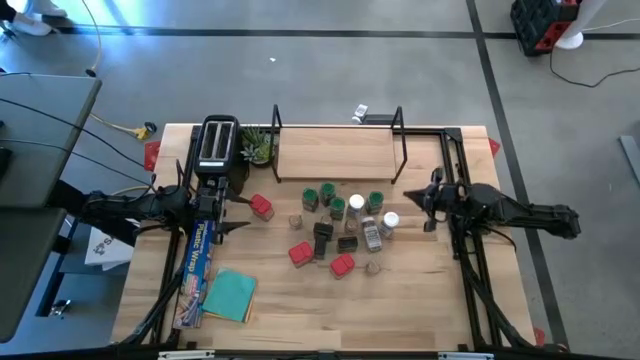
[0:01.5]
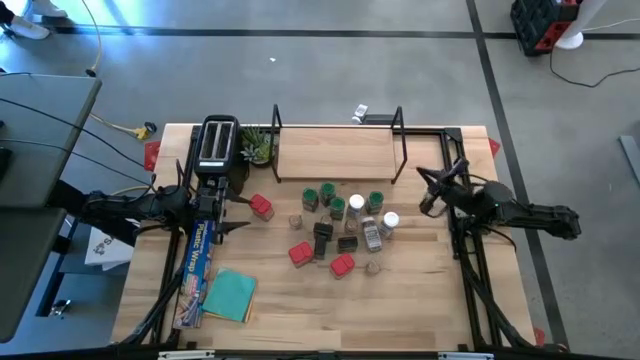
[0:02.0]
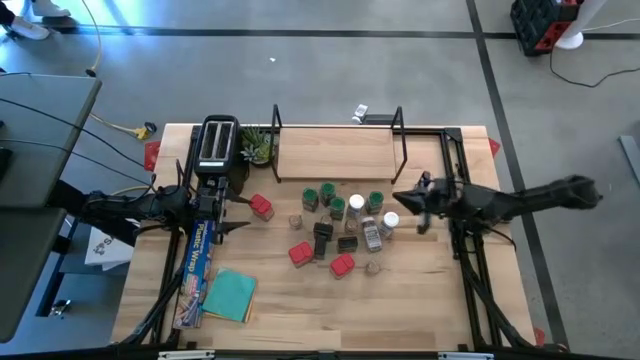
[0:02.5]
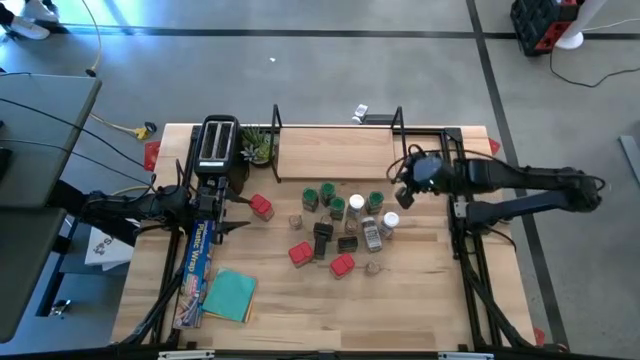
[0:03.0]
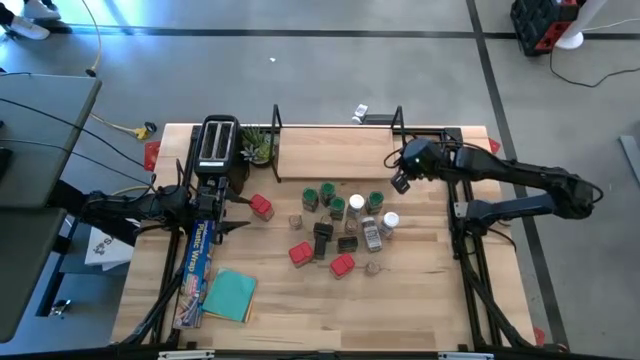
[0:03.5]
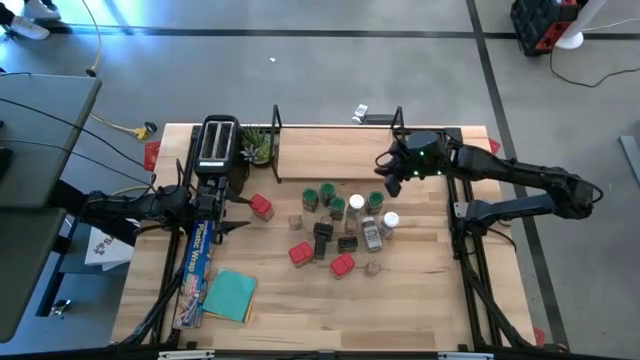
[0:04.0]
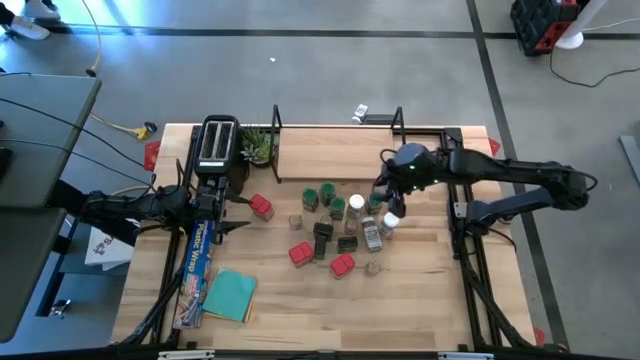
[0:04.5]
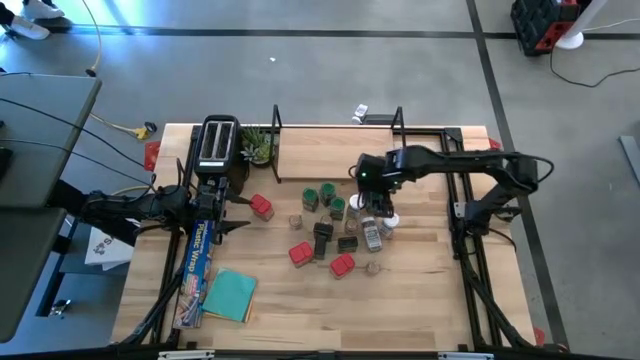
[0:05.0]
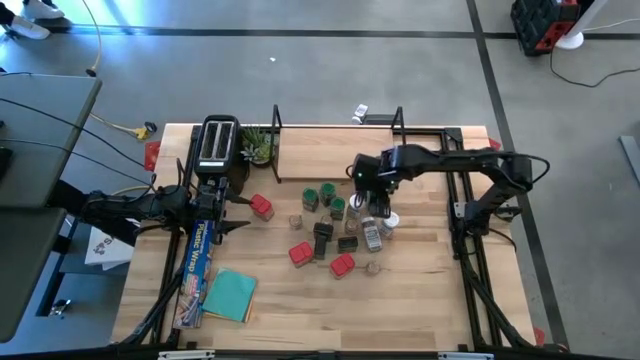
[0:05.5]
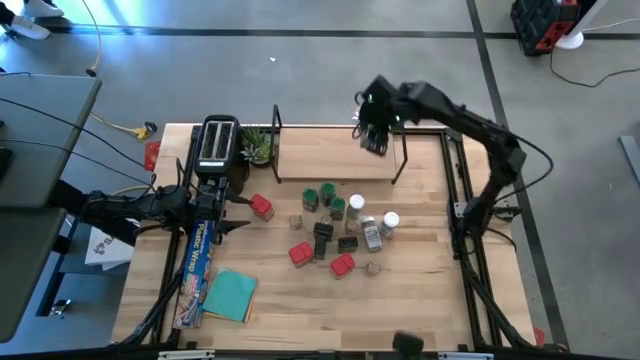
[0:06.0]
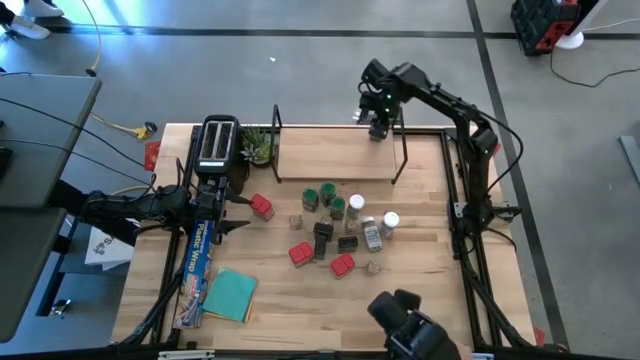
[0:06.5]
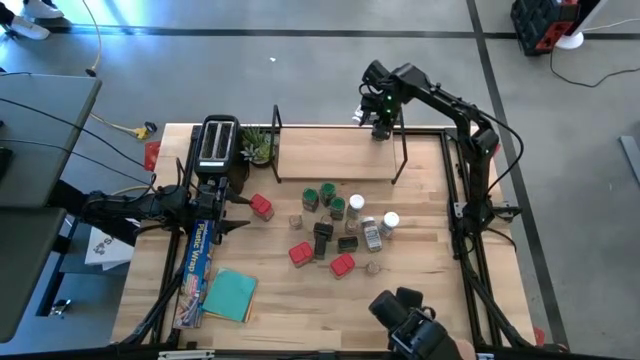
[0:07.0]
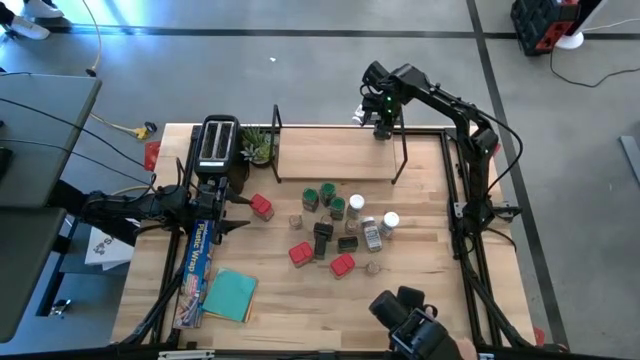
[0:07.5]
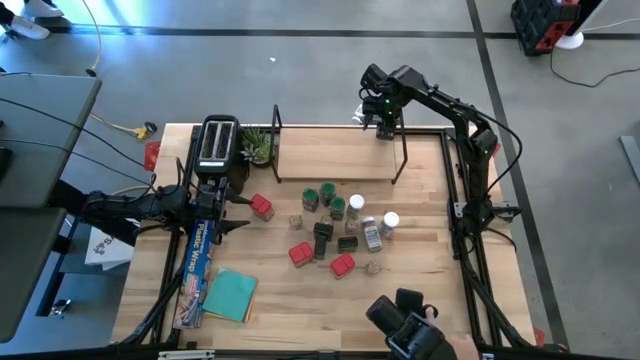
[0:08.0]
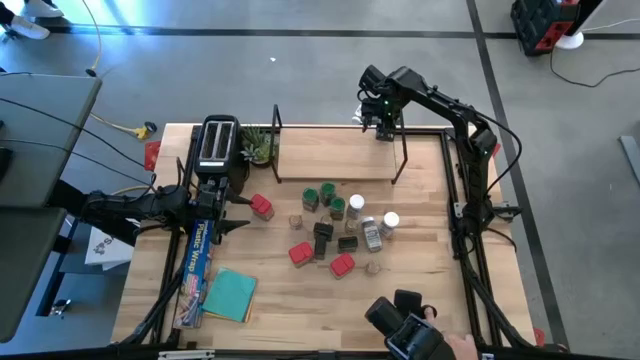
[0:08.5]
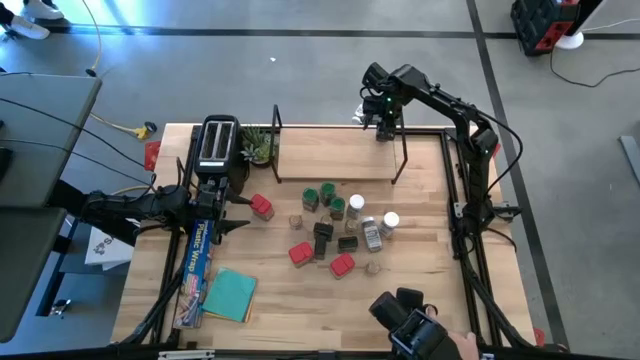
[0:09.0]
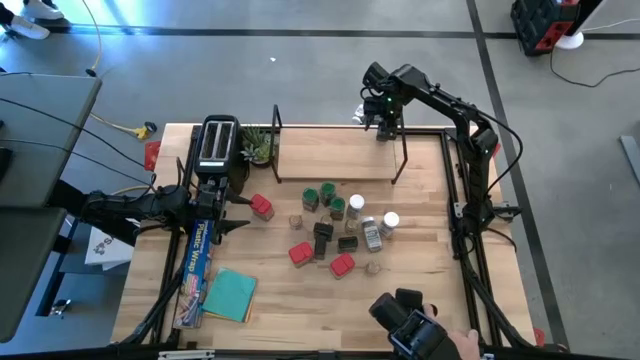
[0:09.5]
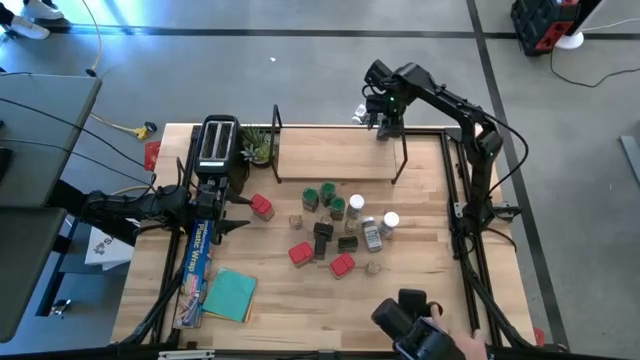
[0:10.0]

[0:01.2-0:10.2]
Task: Shelf spices
Put the right green seasoning bottle on the shelf

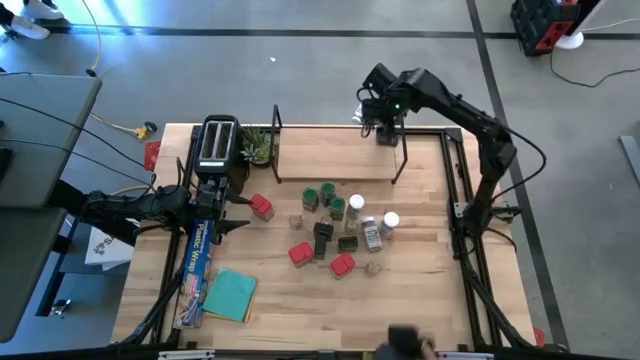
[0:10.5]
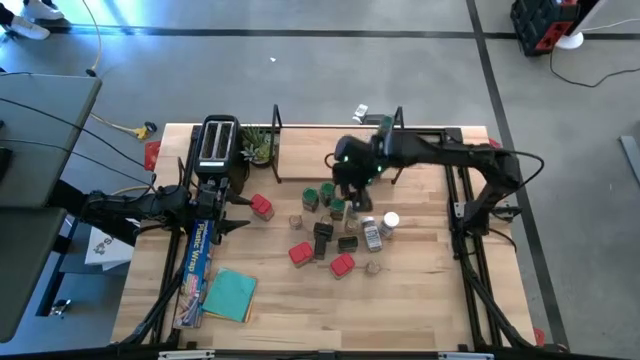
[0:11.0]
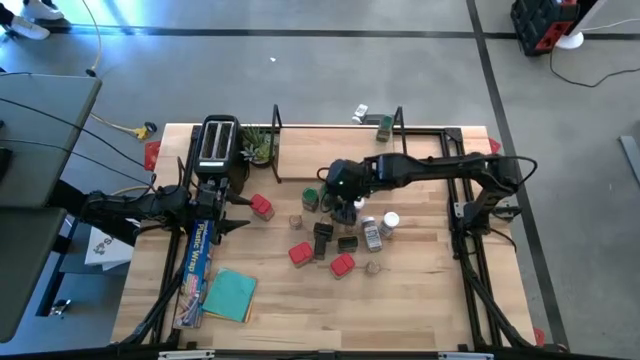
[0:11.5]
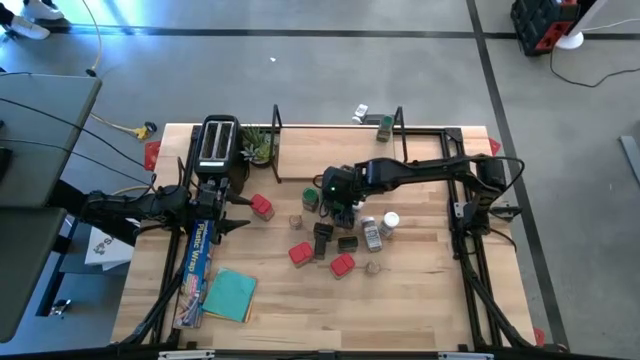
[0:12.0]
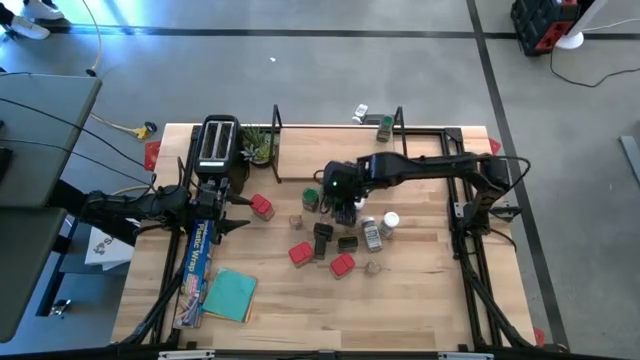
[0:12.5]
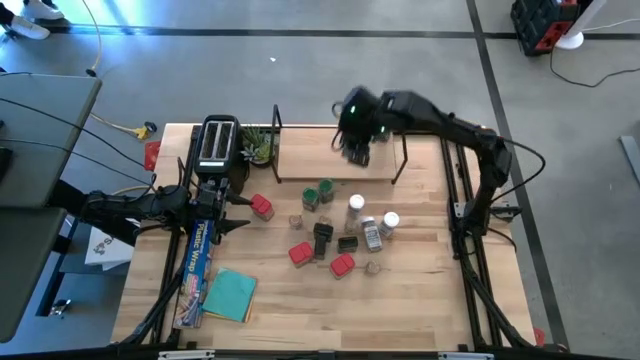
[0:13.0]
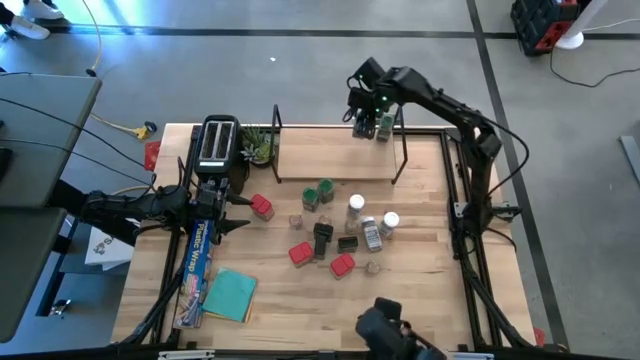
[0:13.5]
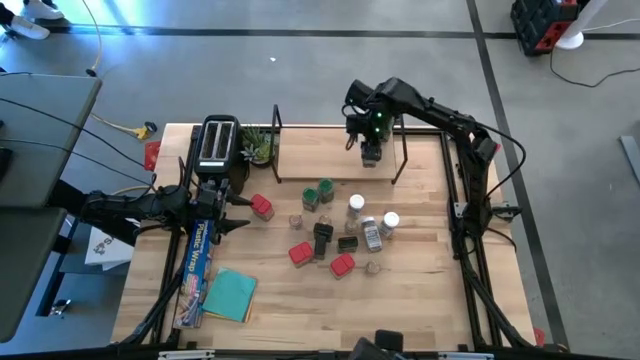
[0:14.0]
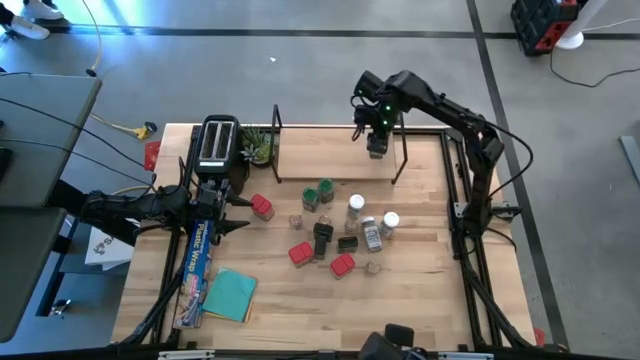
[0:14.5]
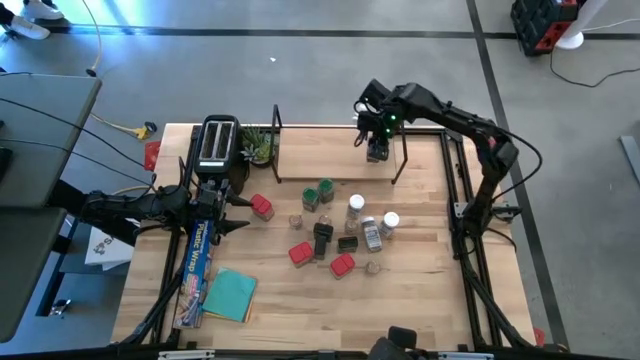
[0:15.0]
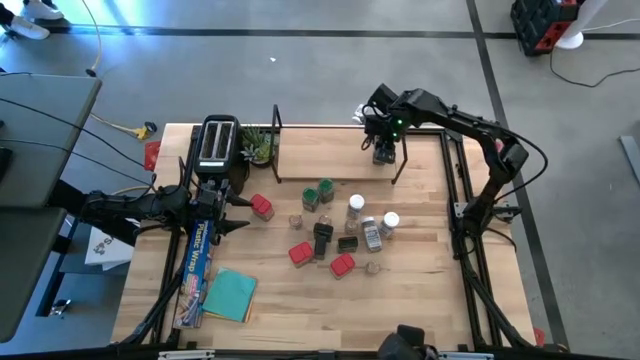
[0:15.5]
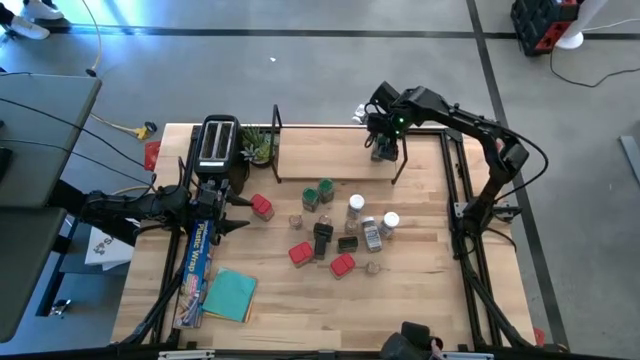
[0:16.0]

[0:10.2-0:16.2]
Put the right green seasoning bottle on the shelf aligned with the other green seasoning bottle

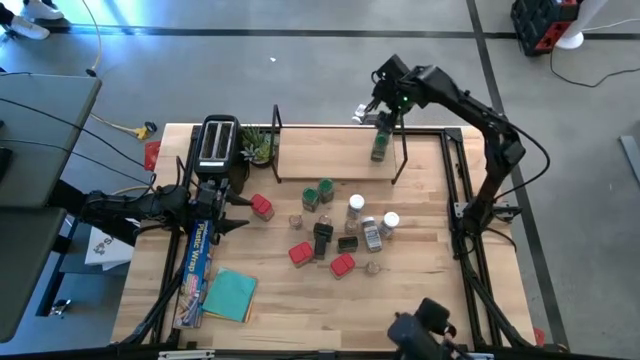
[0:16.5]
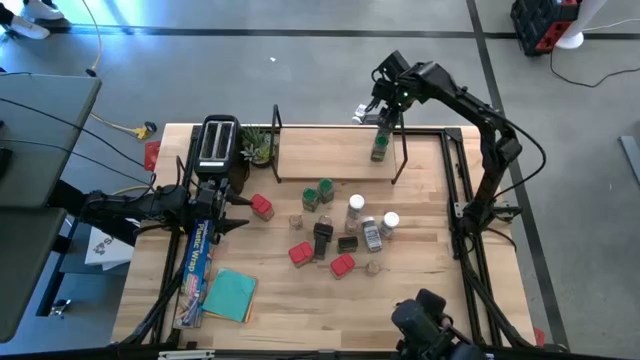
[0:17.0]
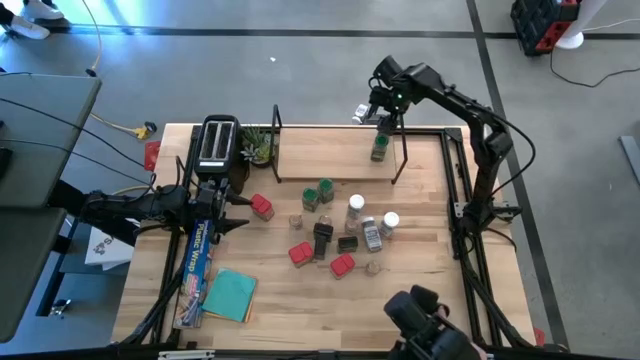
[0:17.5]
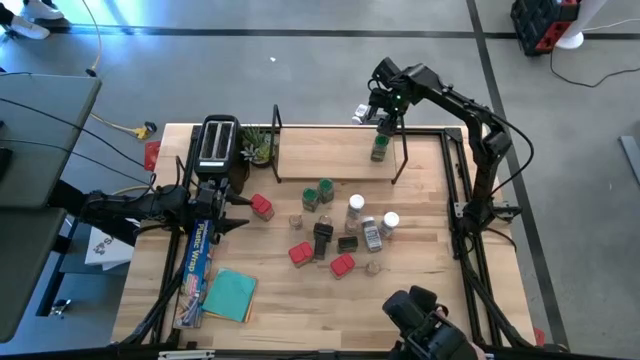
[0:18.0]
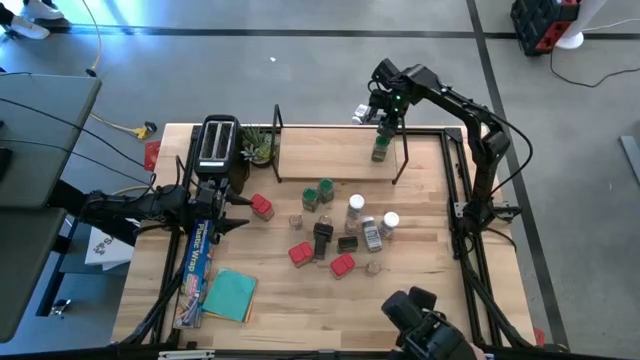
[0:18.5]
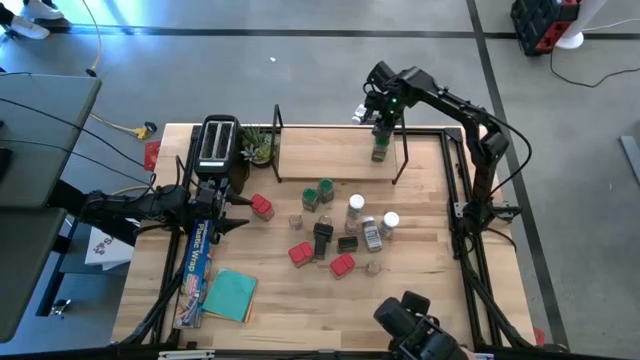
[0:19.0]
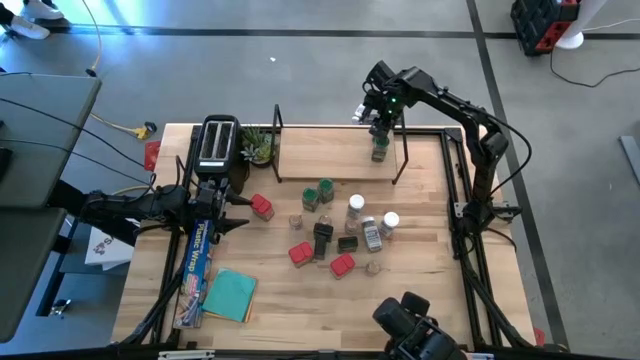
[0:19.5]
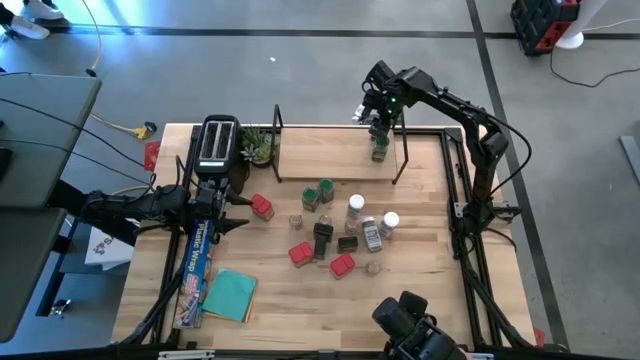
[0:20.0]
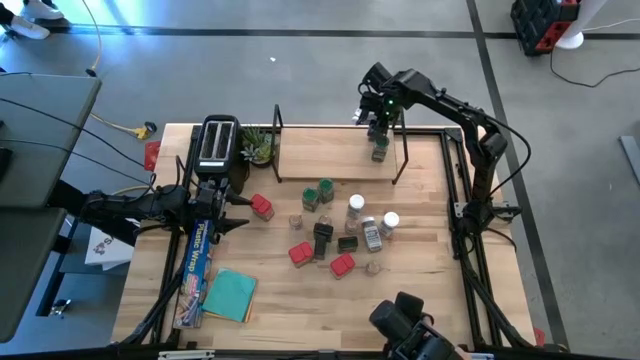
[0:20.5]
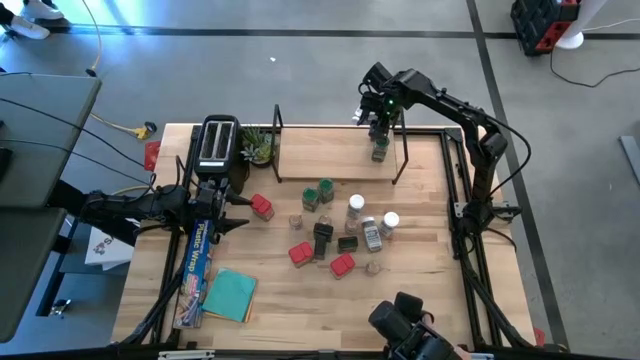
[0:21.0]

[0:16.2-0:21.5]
Adjust the top green seasoning bottle

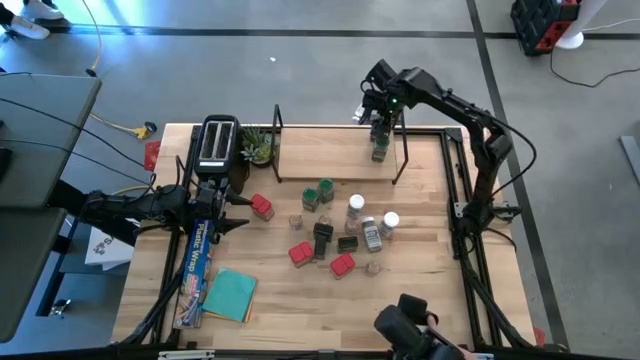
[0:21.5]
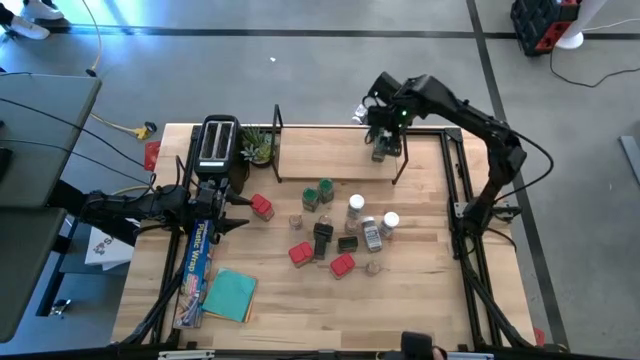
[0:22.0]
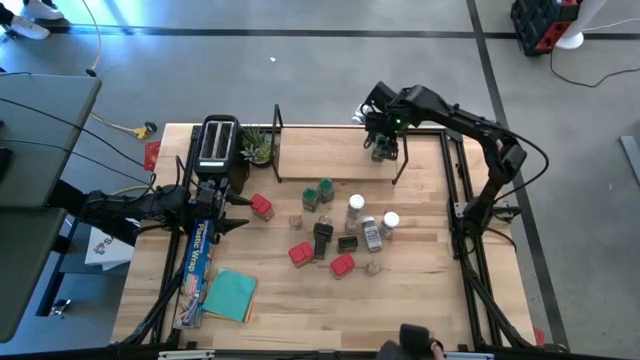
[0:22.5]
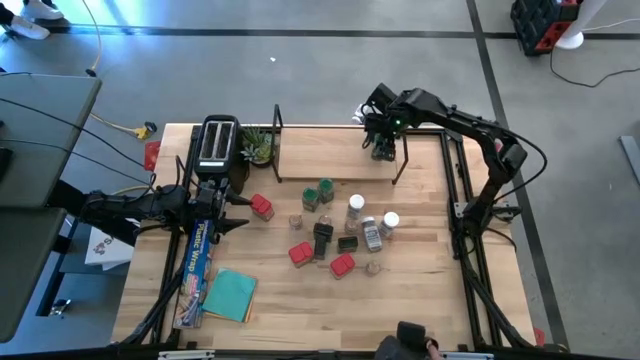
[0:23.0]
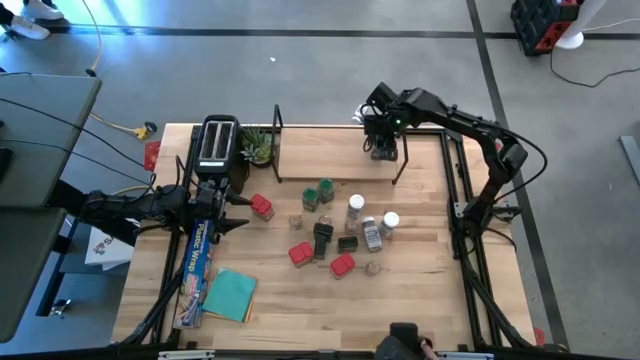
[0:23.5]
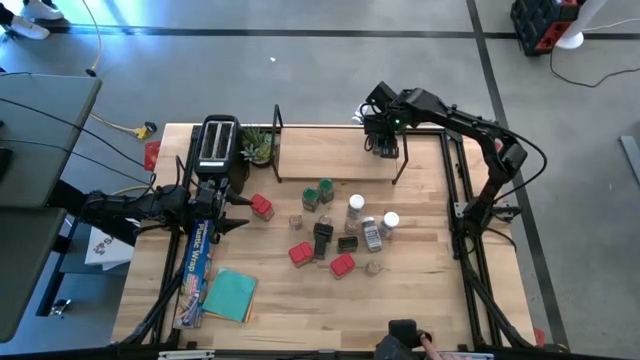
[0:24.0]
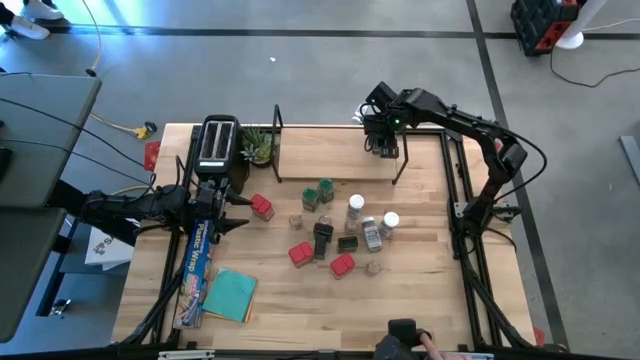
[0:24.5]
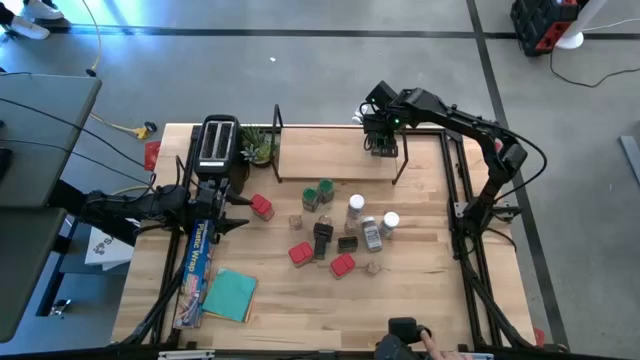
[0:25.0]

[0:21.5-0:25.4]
Adjust the green seasoning bottle
